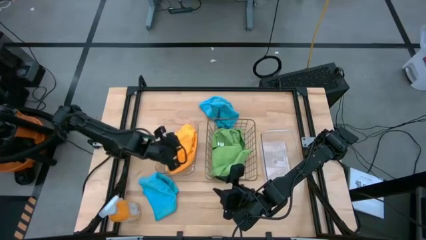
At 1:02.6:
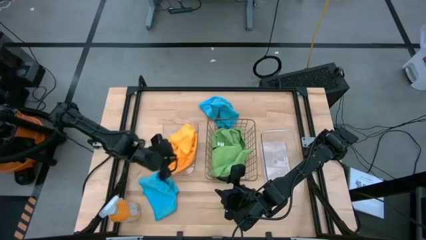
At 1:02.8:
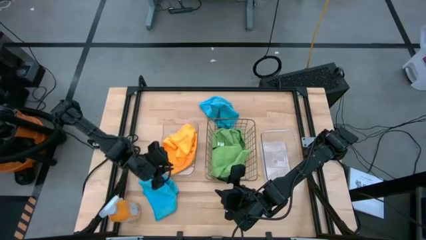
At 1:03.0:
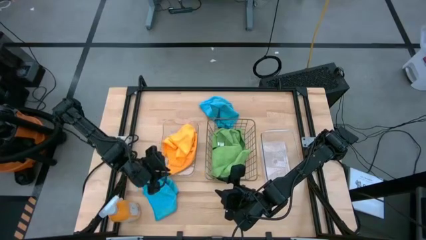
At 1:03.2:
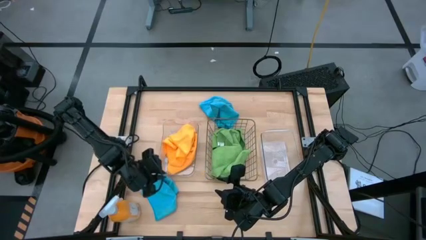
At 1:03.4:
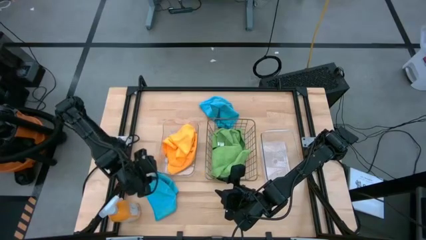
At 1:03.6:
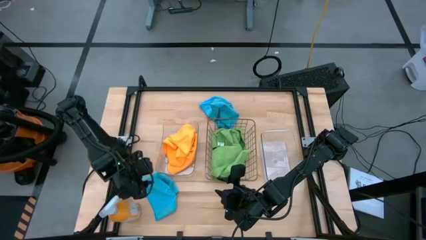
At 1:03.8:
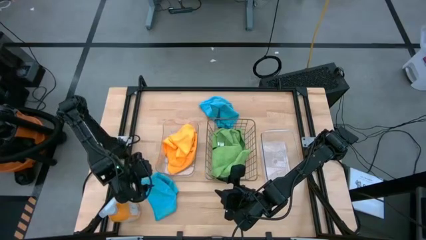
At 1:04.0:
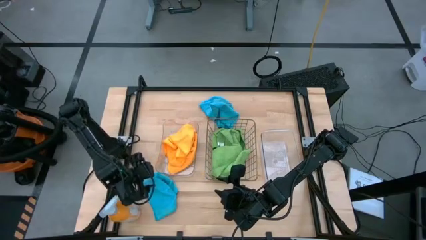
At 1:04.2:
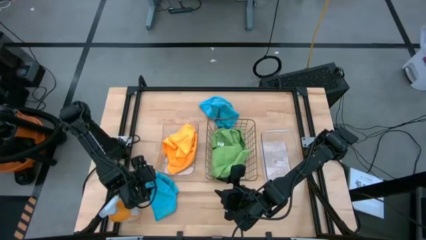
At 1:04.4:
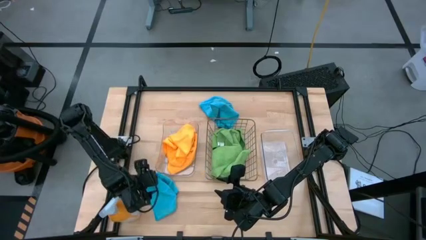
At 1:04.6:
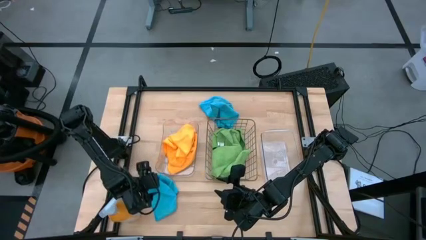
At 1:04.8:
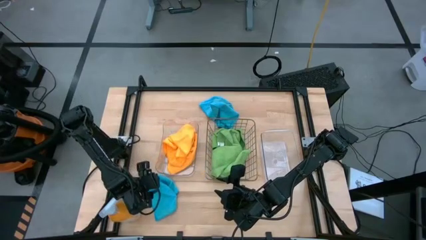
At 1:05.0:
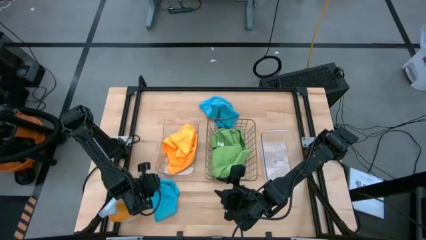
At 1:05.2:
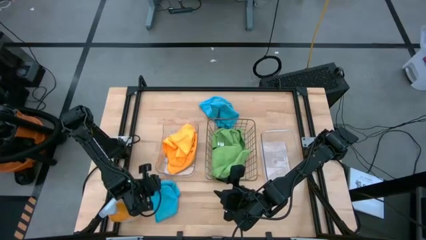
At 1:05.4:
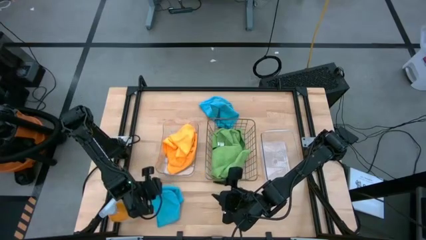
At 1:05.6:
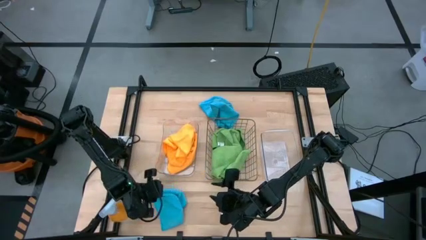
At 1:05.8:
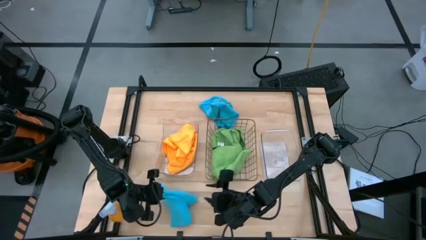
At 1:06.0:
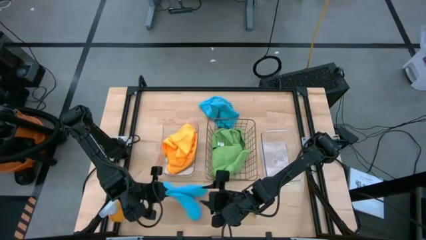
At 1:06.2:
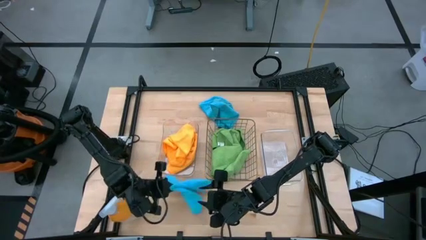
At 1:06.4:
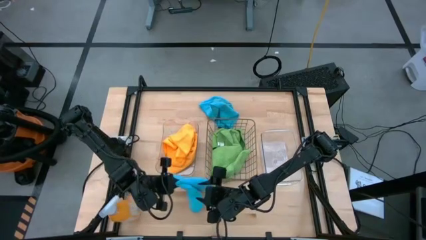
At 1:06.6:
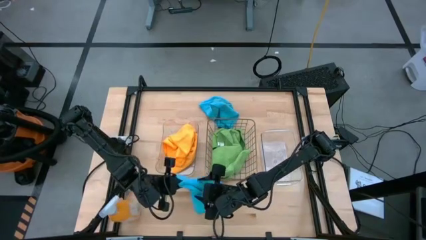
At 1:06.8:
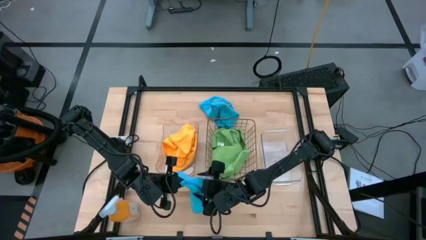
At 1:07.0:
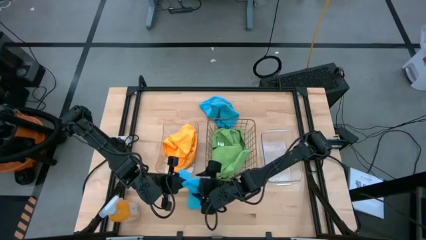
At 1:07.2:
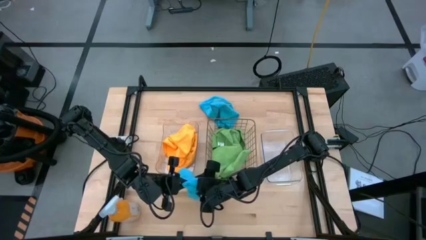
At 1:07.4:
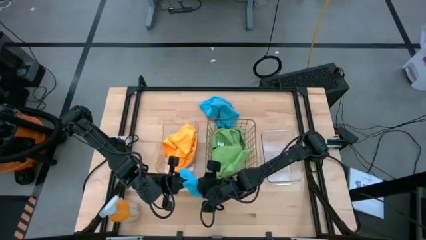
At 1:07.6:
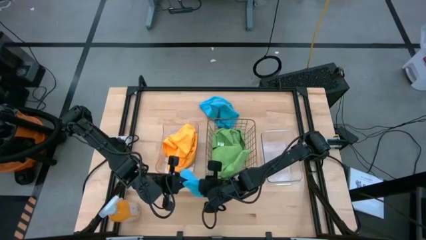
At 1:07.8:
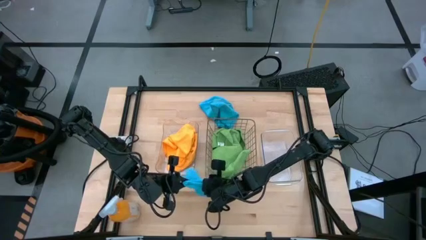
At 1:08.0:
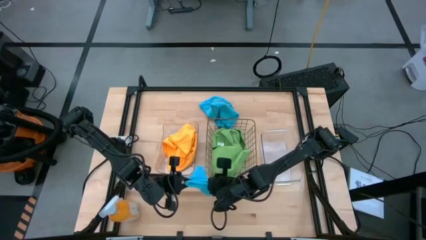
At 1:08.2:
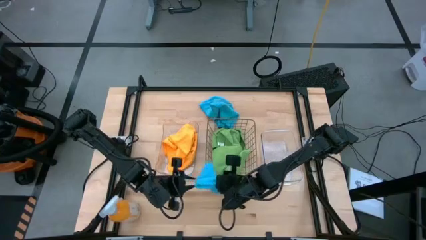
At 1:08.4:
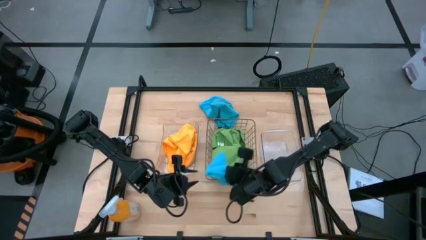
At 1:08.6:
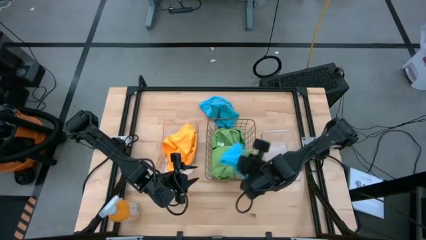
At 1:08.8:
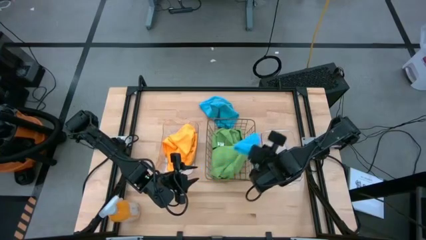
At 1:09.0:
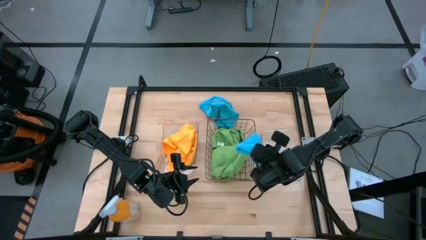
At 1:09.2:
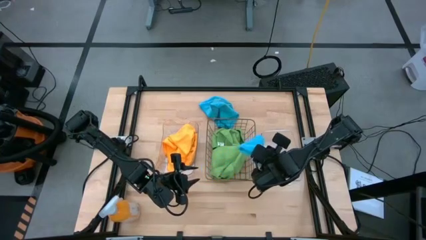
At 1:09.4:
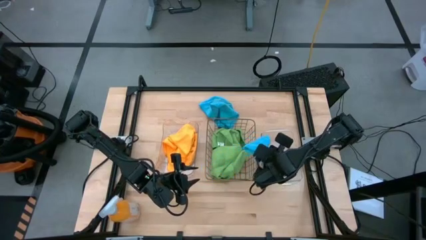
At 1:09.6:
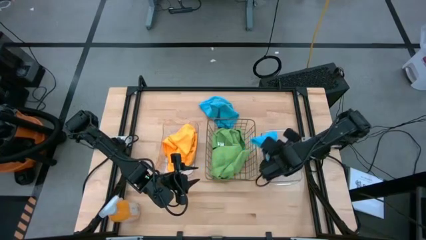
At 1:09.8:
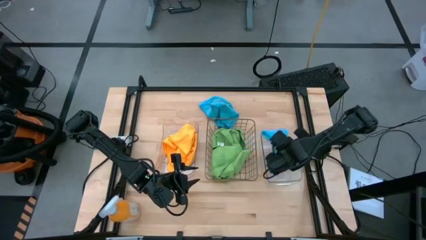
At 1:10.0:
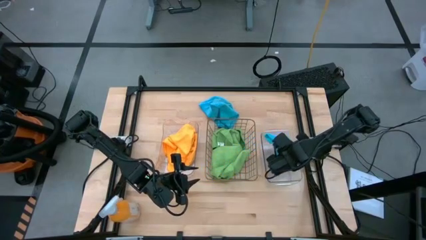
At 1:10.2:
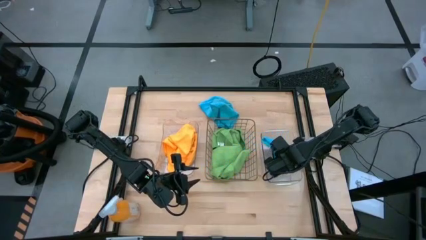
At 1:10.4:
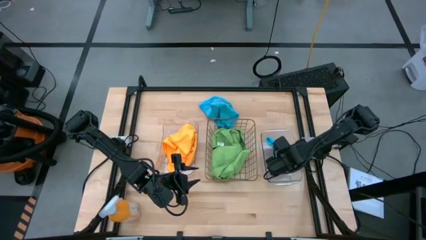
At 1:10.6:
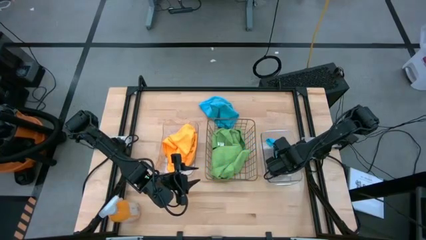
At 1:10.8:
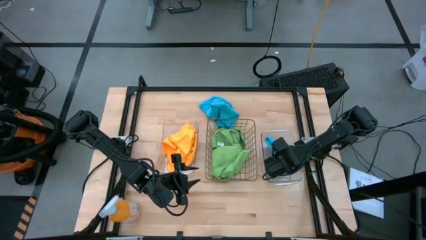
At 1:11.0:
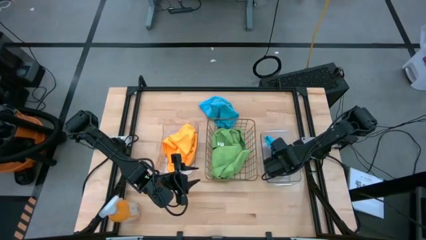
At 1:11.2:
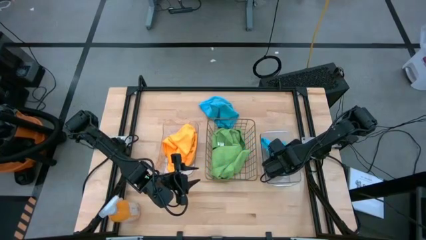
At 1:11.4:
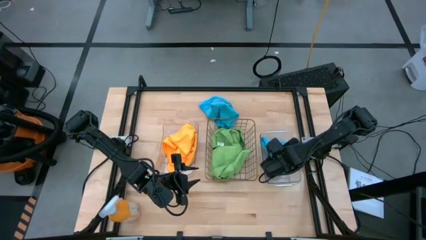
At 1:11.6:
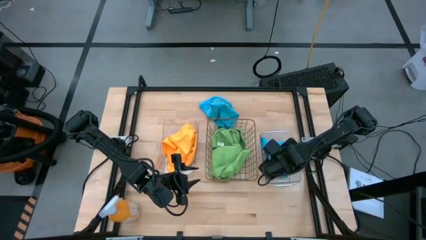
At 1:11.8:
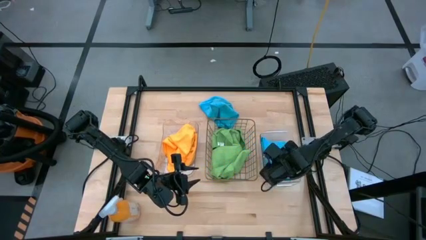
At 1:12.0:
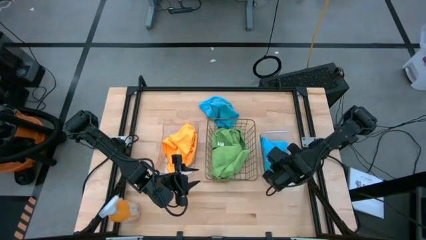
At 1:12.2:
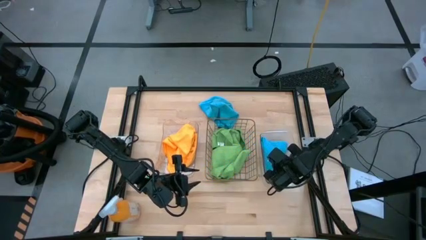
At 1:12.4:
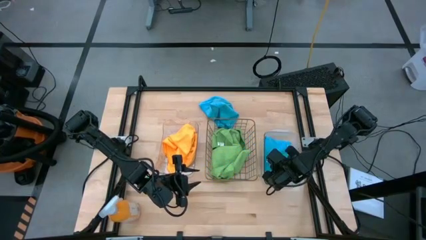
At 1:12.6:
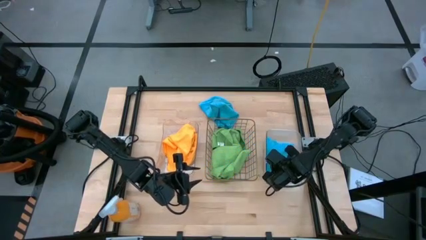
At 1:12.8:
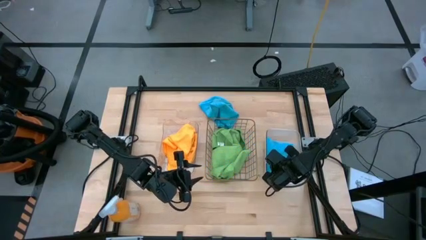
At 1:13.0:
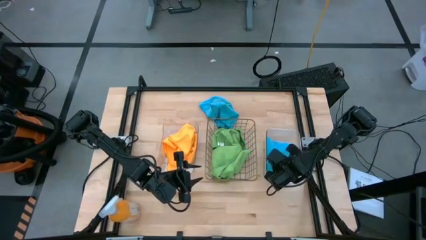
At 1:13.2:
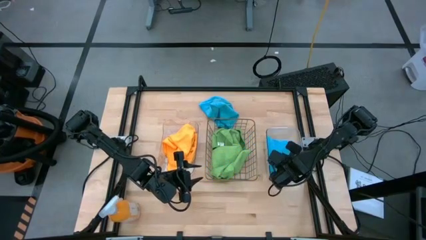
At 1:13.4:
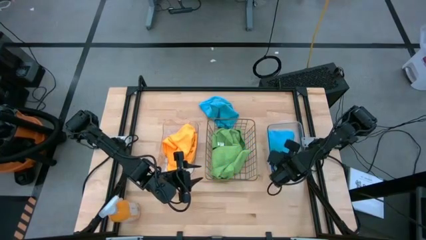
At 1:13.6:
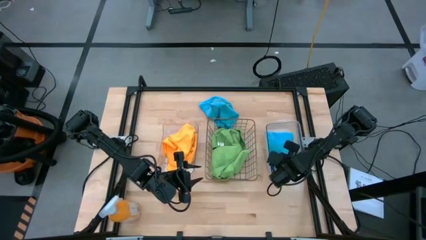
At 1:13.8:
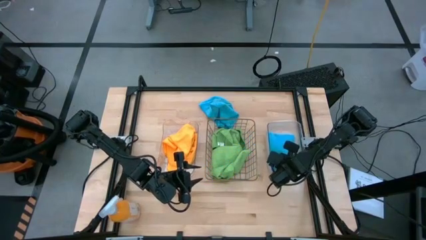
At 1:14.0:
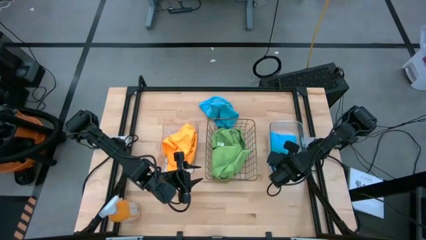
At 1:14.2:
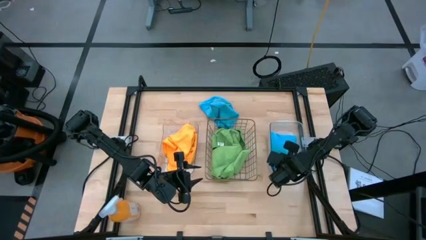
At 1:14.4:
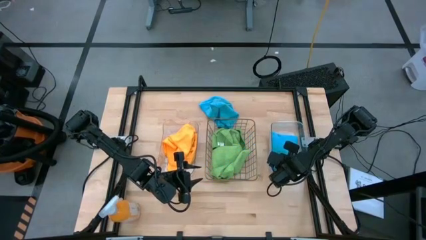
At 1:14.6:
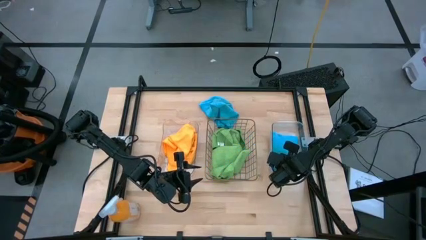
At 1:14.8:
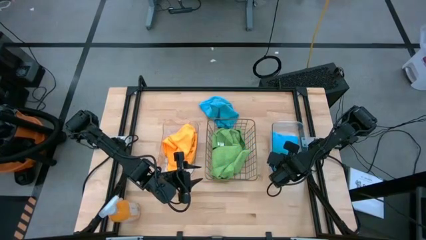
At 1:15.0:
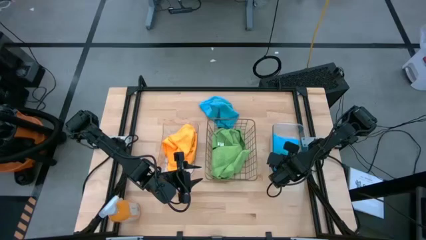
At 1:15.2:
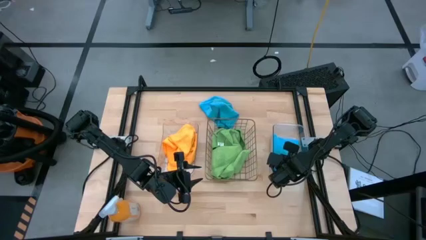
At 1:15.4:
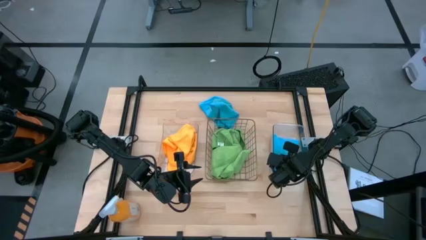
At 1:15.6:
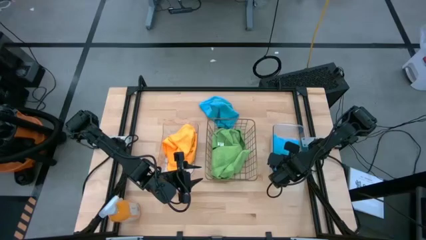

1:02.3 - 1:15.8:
Task: Sort microfiber towel by color & place in baskets
Put the bottom blue microfiber towel into the right transparent bin
